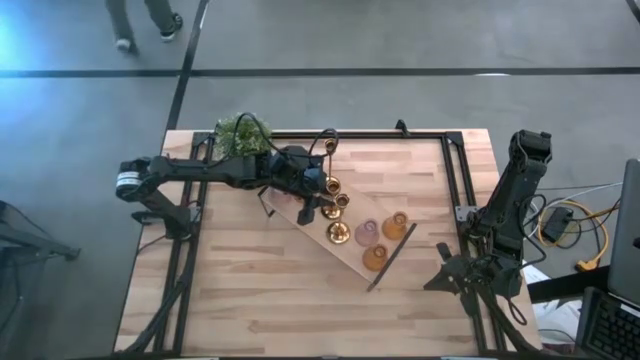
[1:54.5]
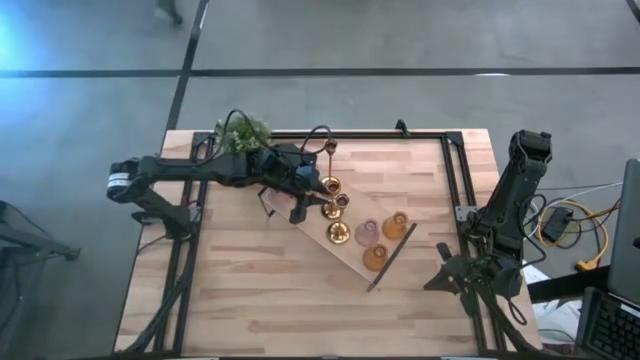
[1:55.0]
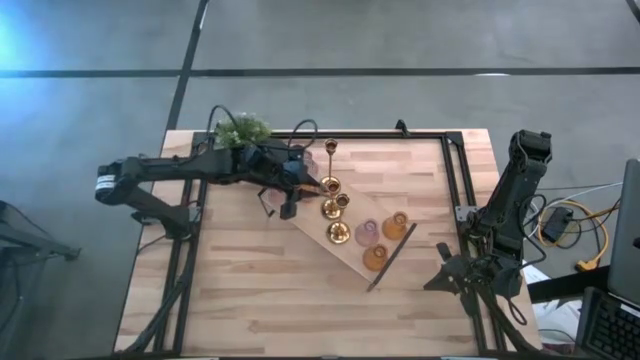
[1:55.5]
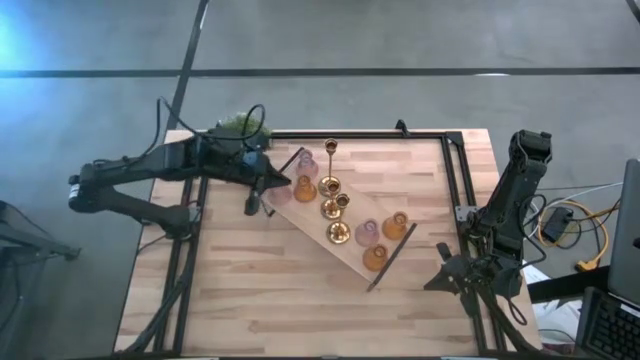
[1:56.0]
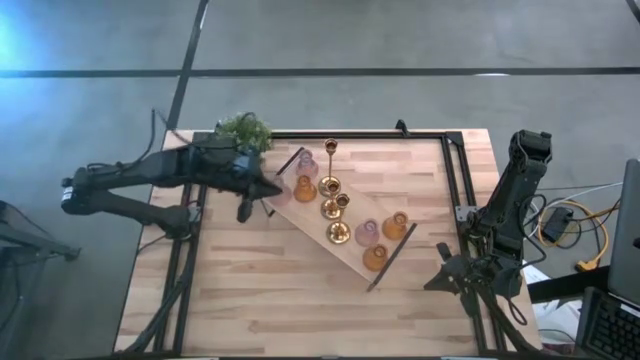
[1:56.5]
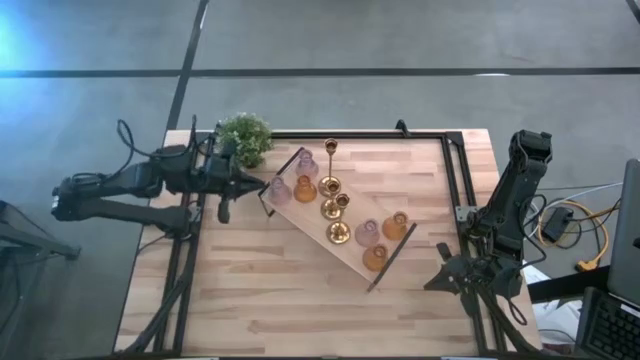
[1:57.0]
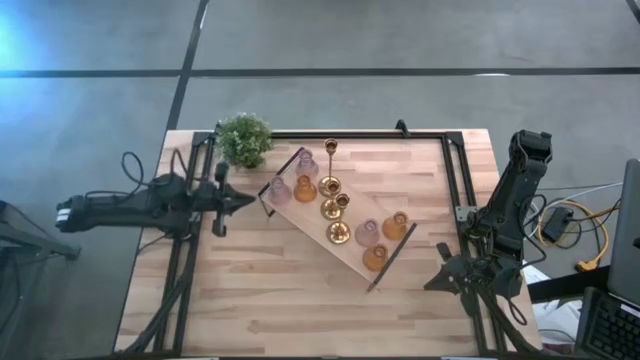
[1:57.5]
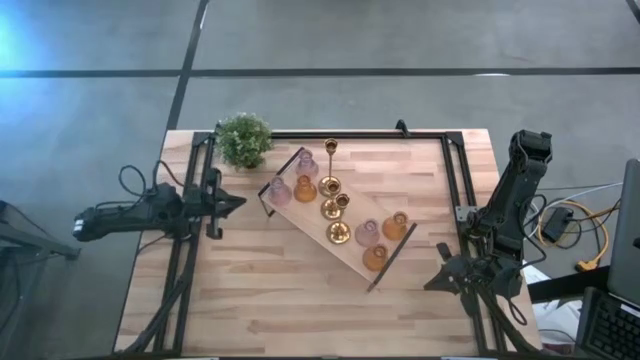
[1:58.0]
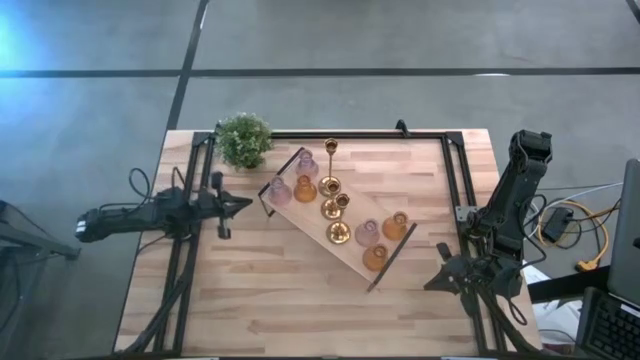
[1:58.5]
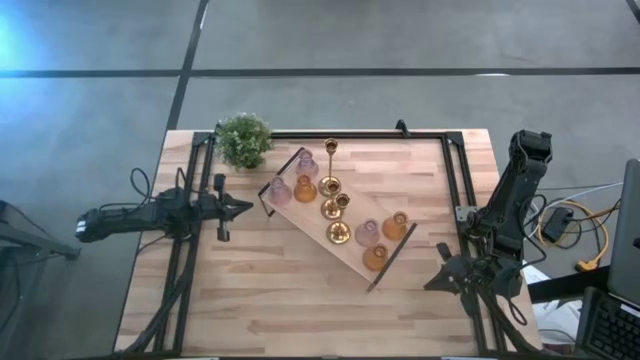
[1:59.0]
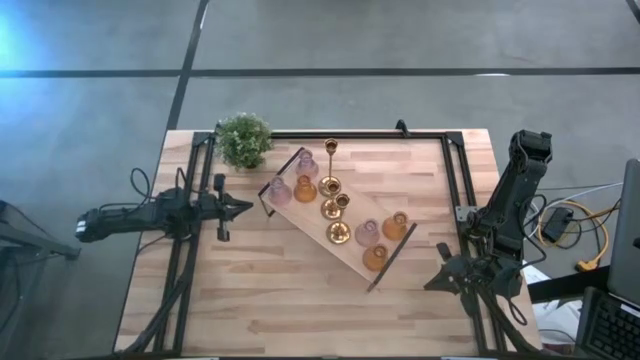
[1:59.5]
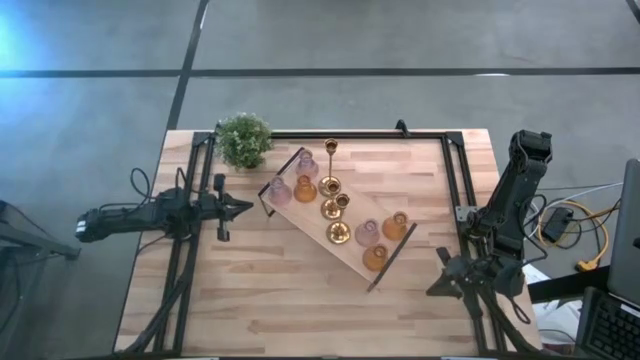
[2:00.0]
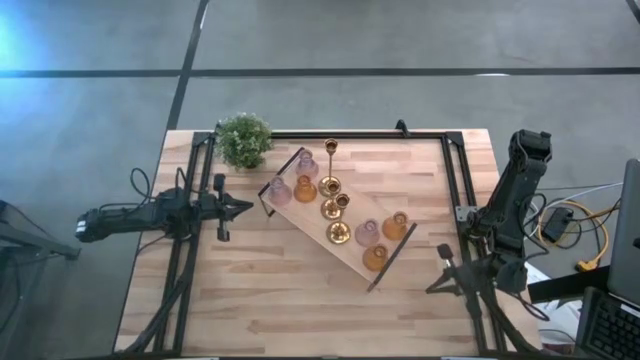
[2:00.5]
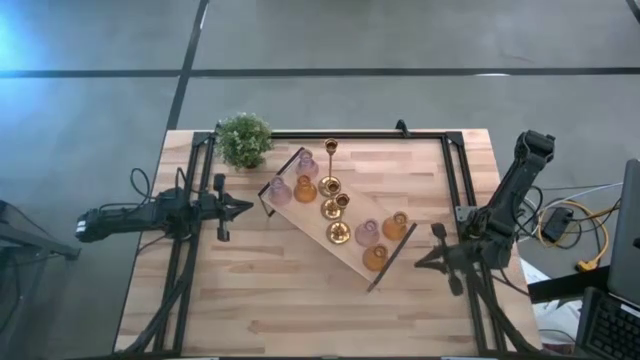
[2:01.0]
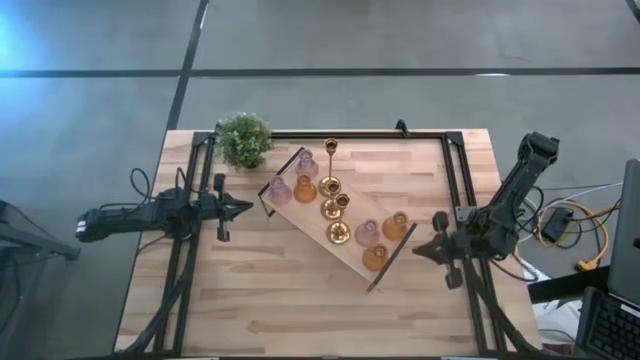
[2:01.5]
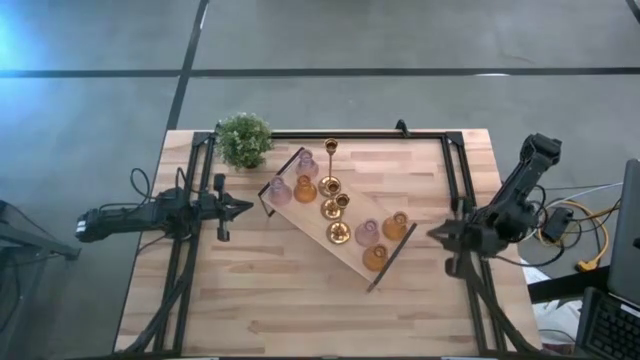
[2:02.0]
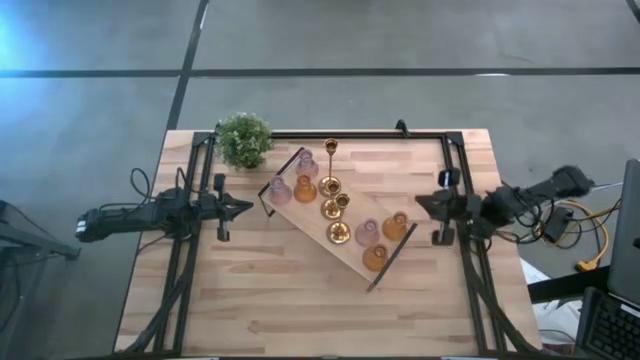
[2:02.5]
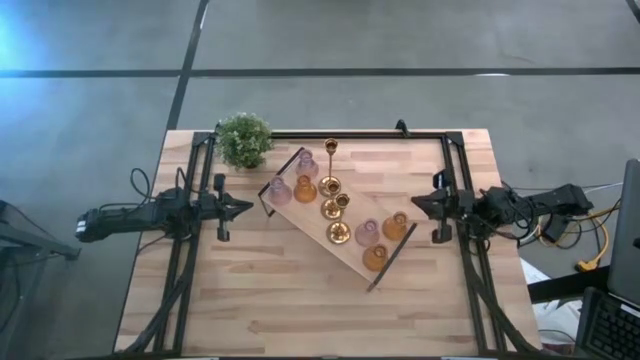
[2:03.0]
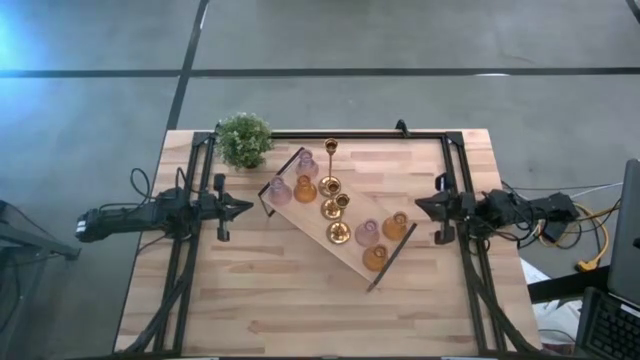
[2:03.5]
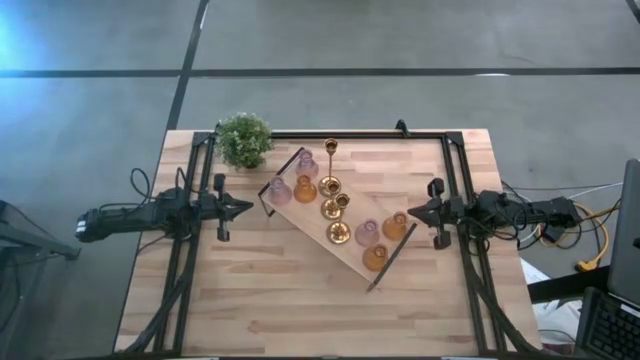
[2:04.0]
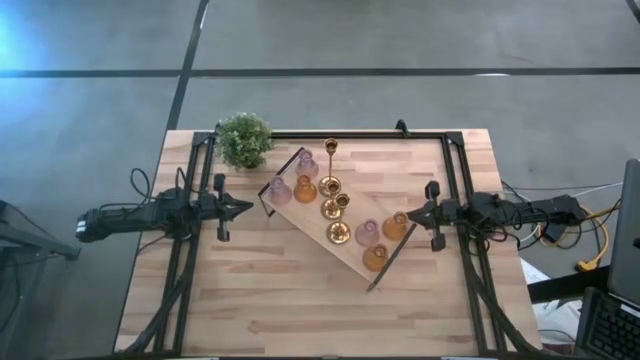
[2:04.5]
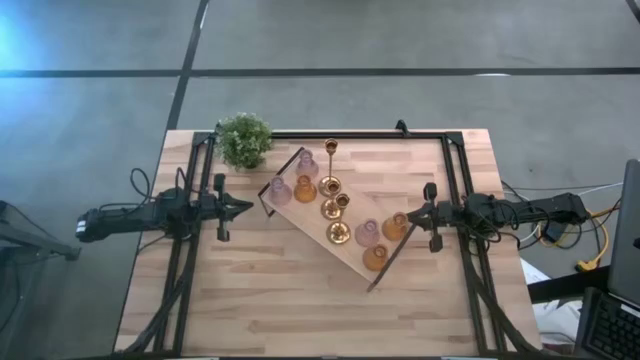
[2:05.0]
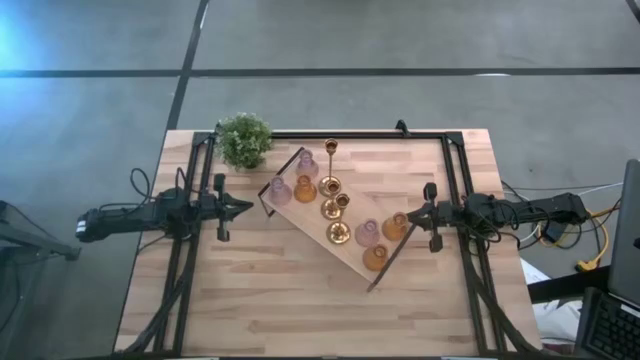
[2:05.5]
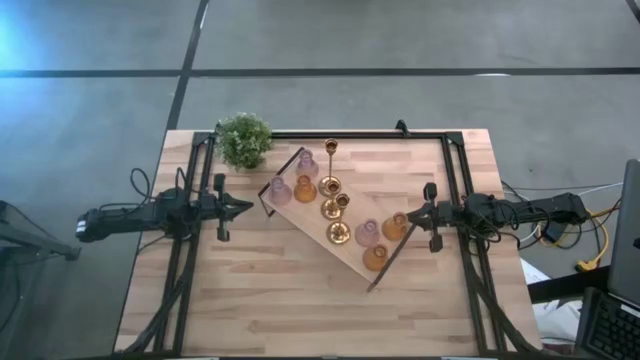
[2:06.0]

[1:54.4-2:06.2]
Task: Pick & Place candle stick holders
Return to Home Position

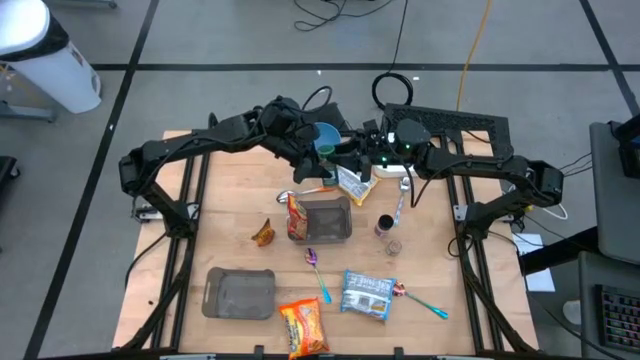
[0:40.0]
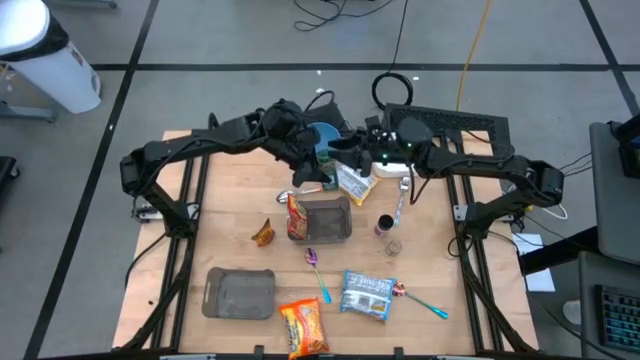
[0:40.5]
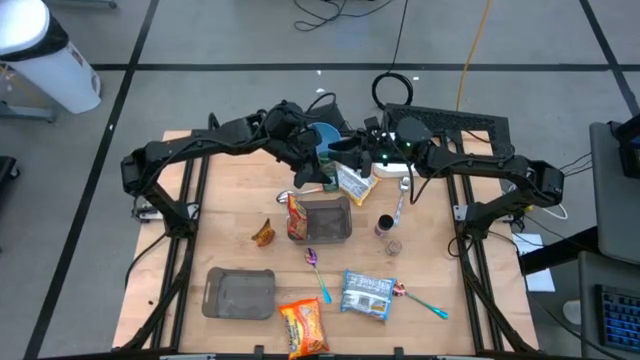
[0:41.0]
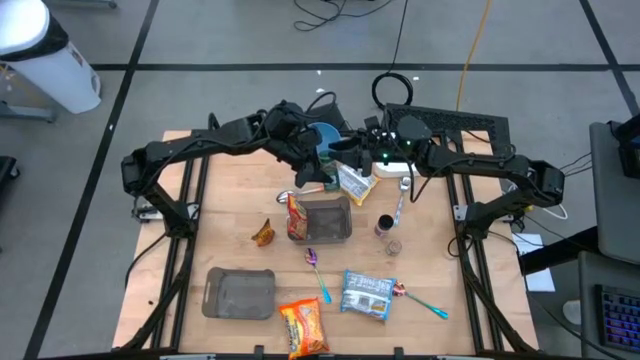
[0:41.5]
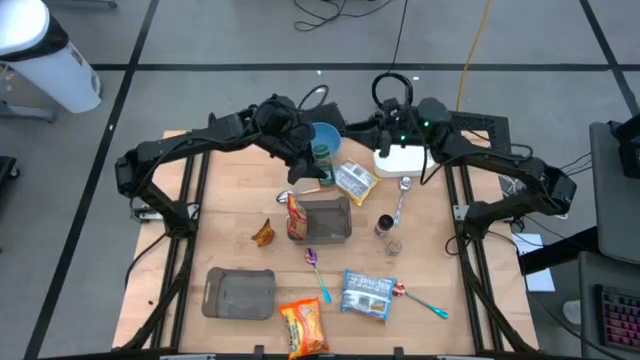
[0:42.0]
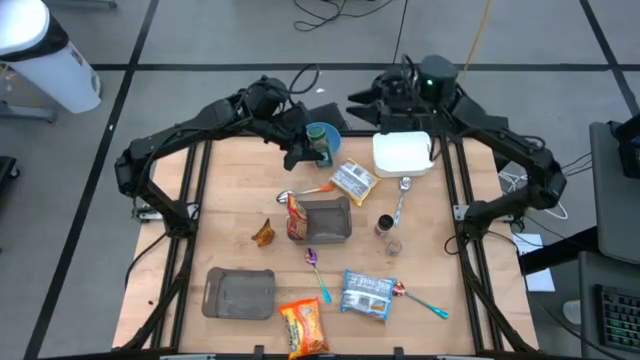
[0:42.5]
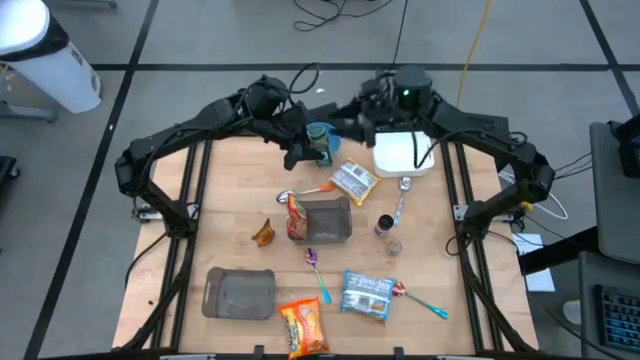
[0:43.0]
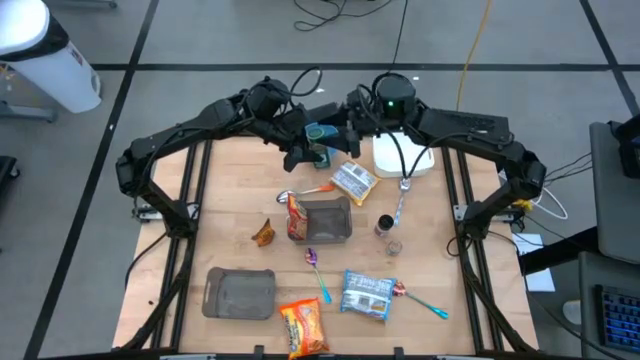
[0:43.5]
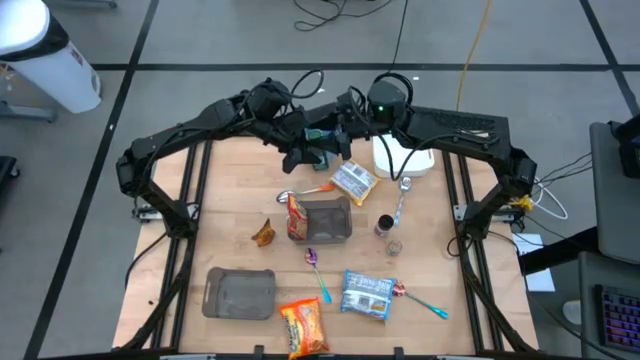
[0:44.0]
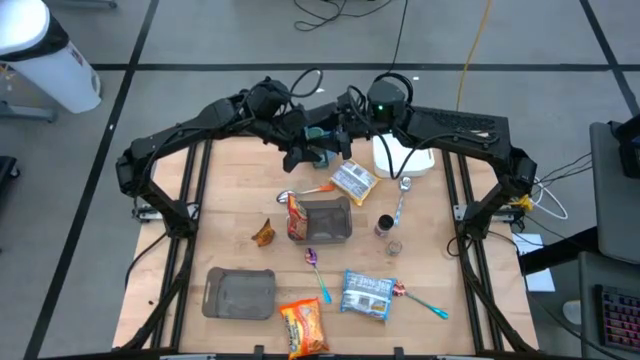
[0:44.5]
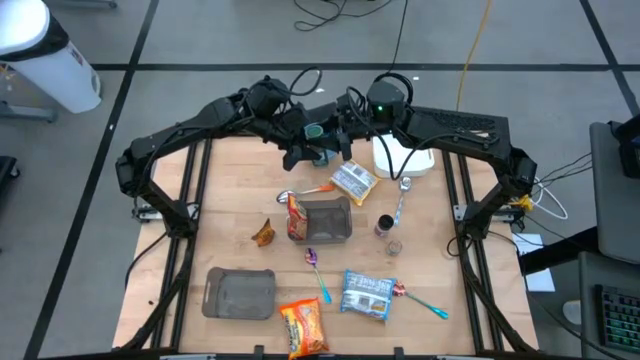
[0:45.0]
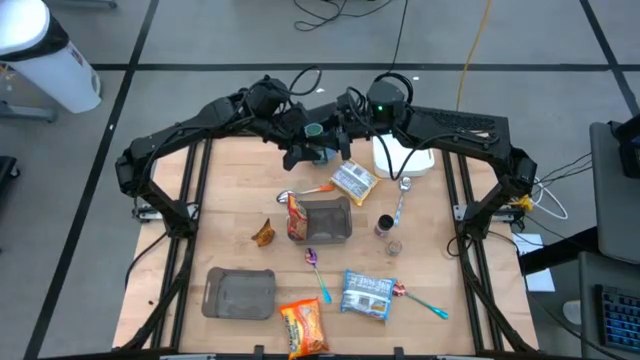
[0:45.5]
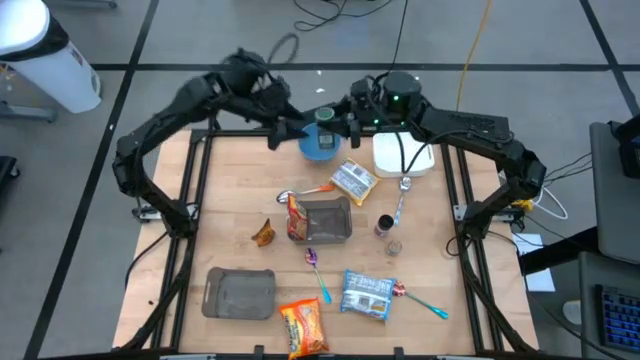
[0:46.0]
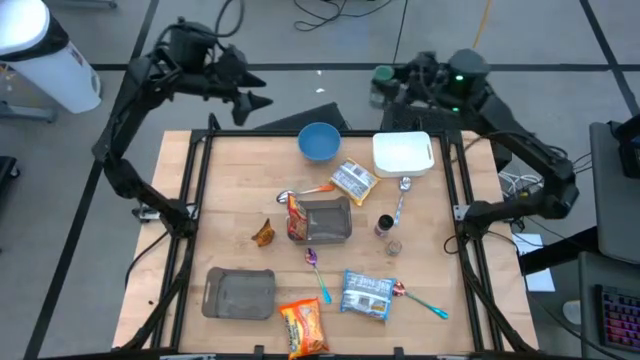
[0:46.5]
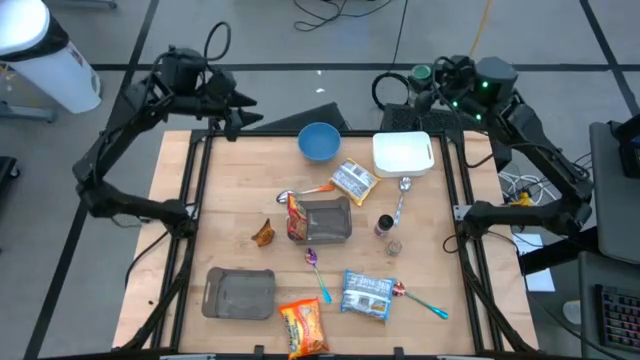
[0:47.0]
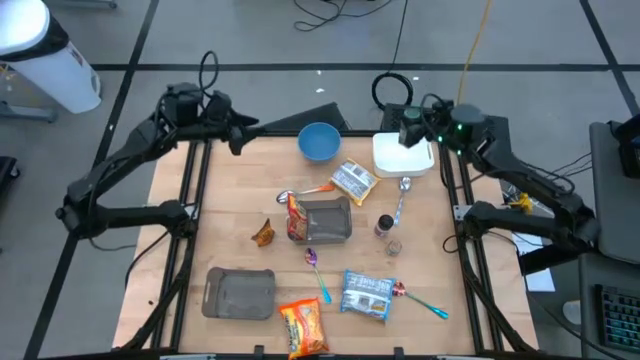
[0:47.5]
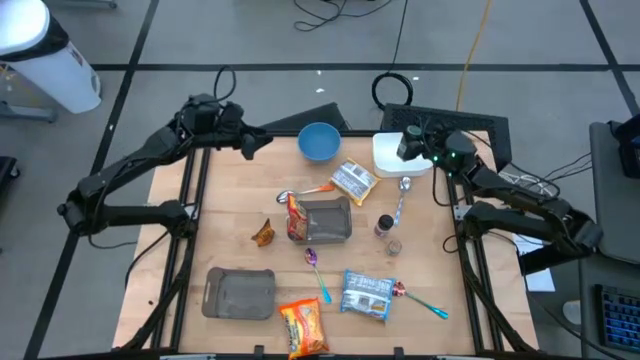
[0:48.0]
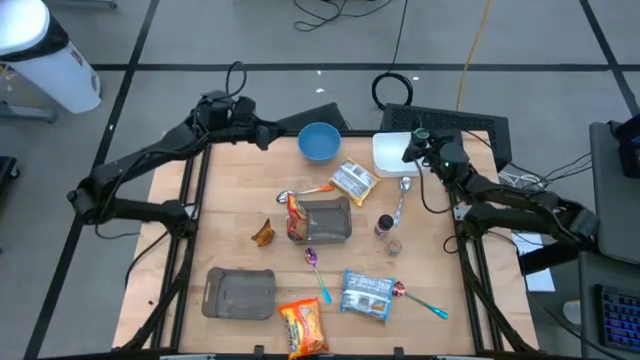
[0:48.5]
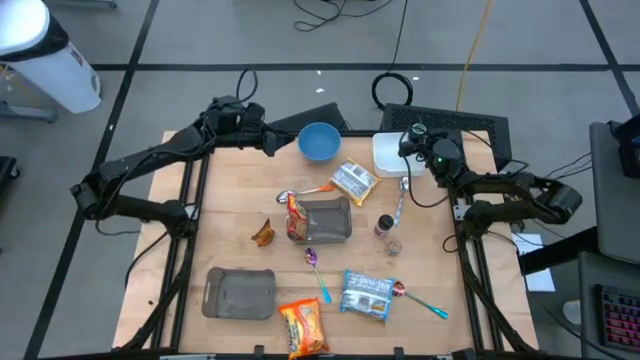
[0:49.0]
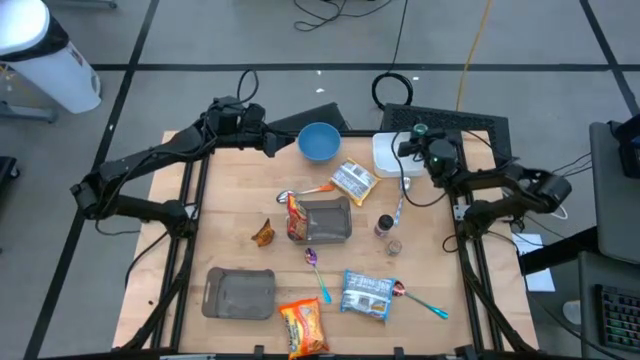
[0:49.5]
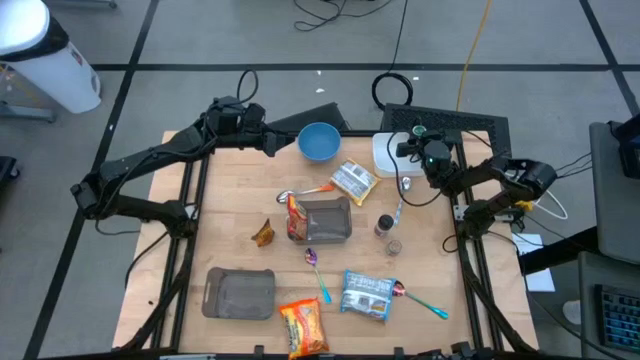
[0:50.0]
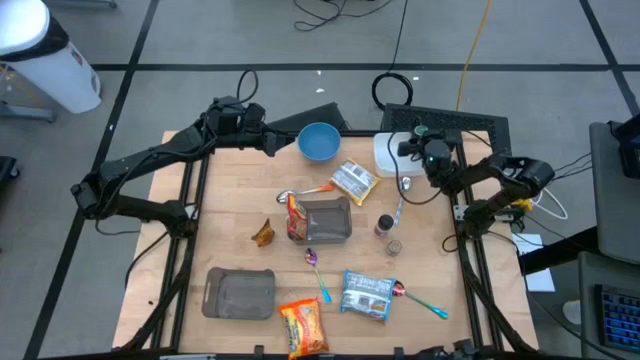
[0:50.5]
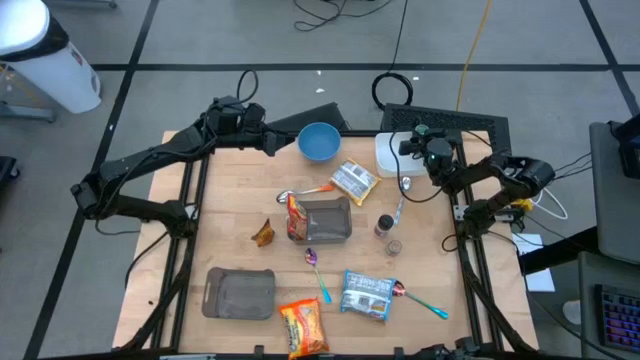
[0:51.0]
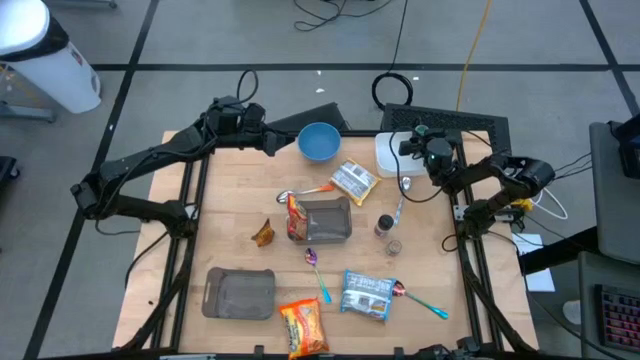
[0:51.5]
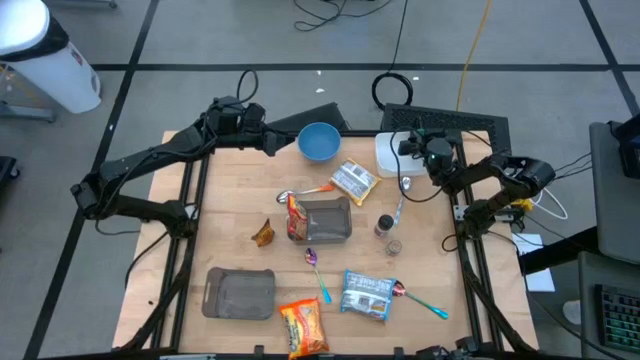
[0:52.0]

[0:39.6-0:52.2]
Task: Pick & Place Food Item
Put the green seasoning bottle into the top white bin
